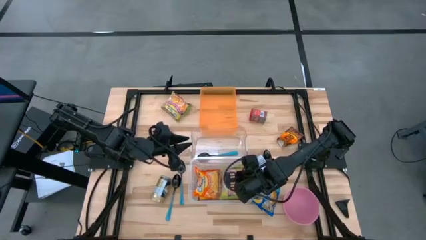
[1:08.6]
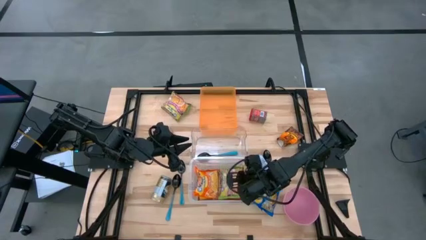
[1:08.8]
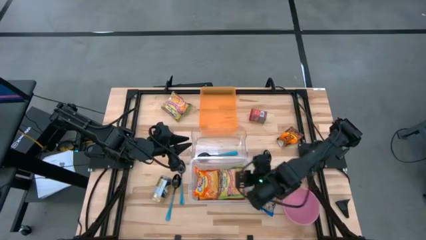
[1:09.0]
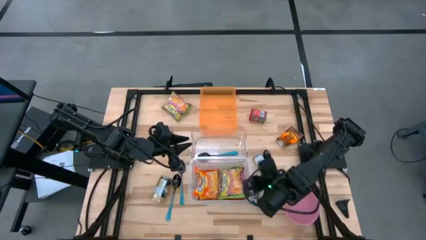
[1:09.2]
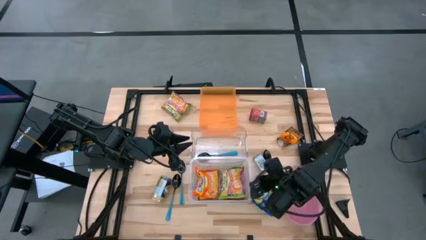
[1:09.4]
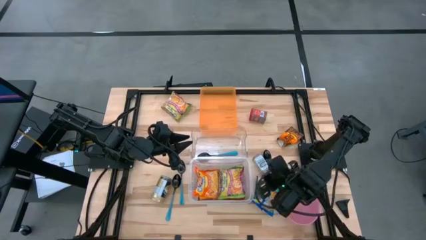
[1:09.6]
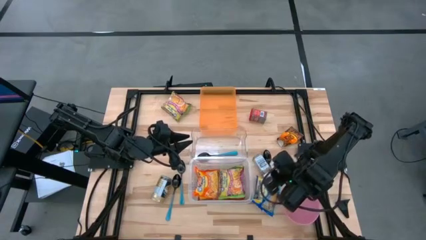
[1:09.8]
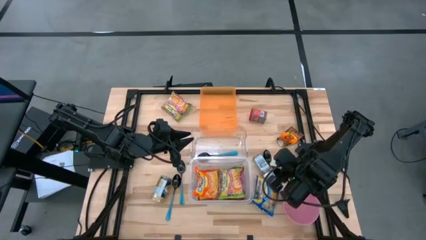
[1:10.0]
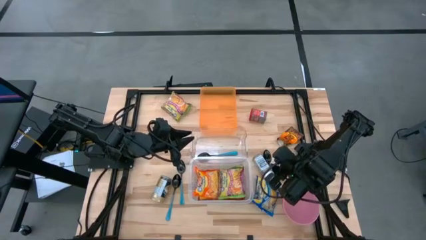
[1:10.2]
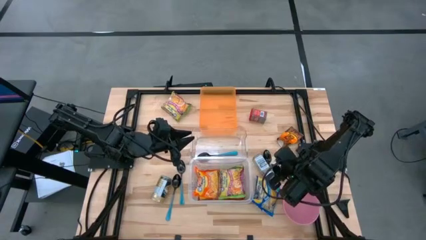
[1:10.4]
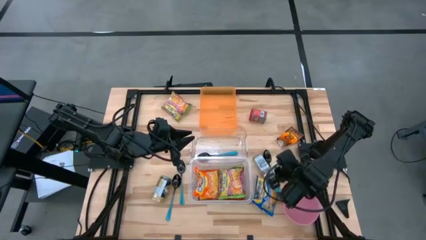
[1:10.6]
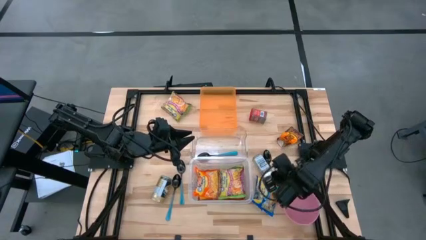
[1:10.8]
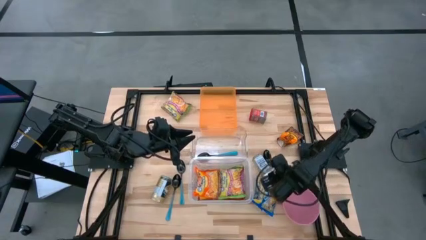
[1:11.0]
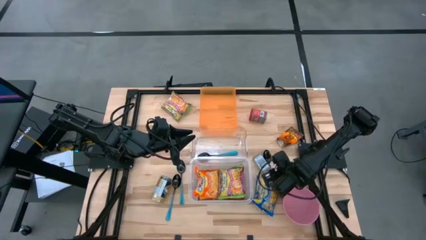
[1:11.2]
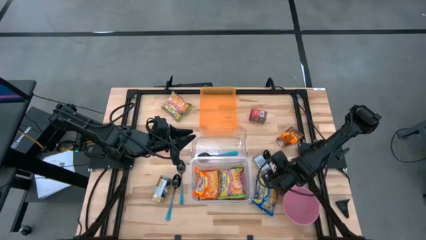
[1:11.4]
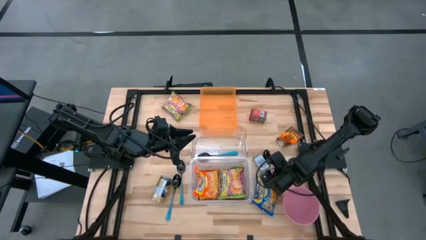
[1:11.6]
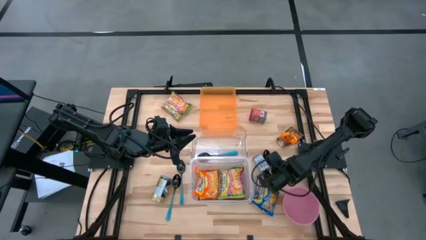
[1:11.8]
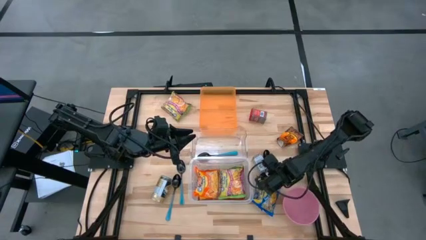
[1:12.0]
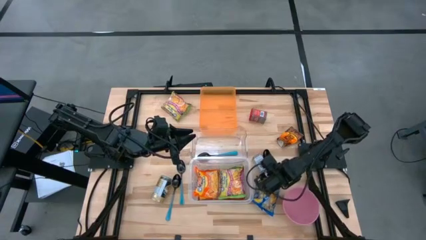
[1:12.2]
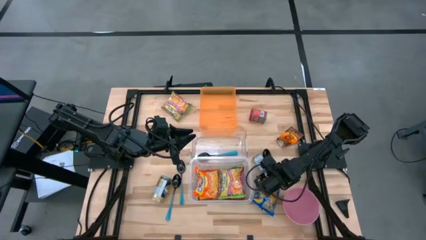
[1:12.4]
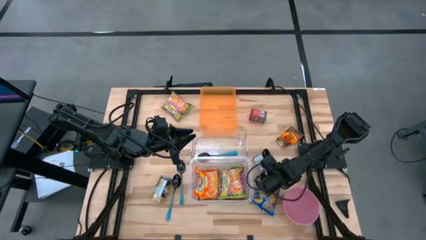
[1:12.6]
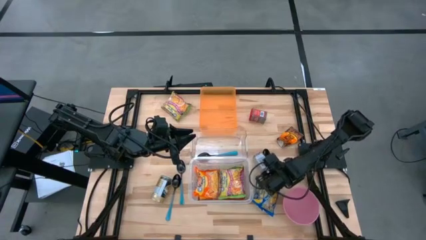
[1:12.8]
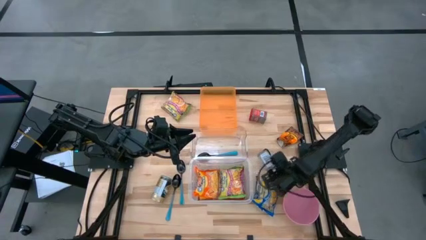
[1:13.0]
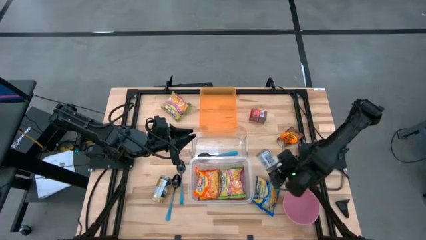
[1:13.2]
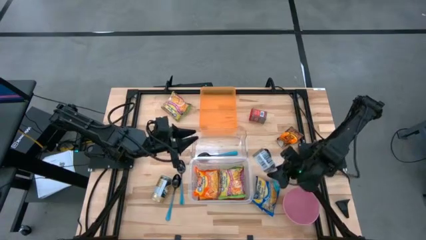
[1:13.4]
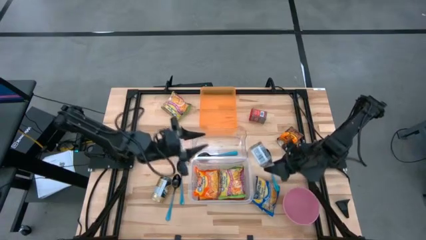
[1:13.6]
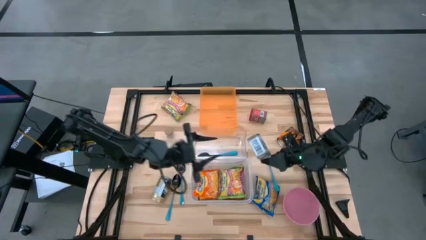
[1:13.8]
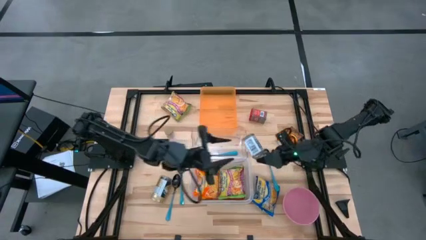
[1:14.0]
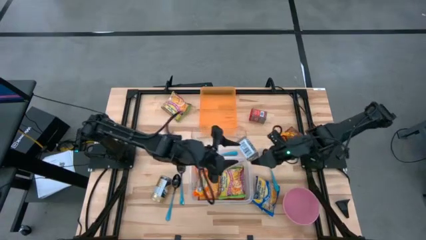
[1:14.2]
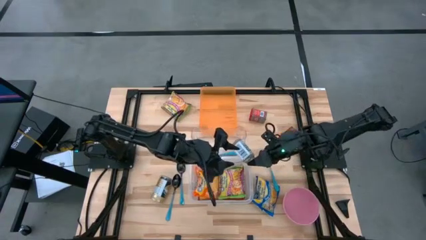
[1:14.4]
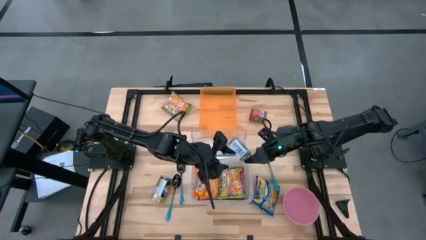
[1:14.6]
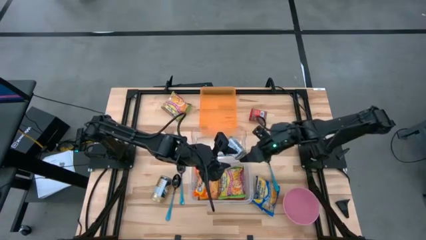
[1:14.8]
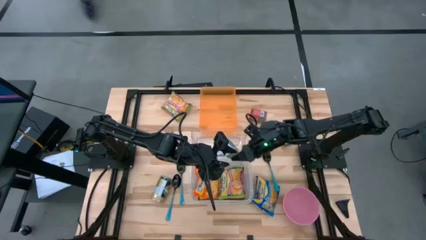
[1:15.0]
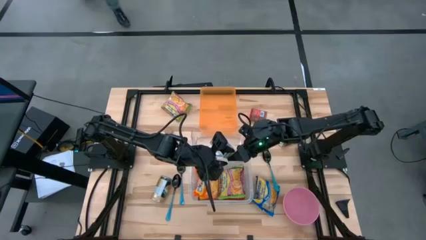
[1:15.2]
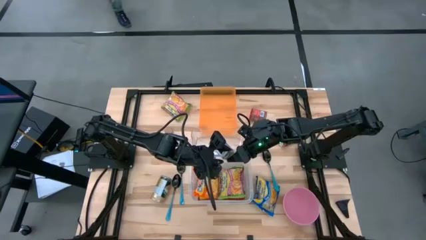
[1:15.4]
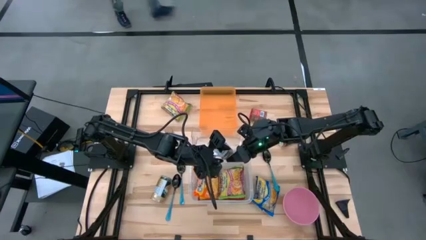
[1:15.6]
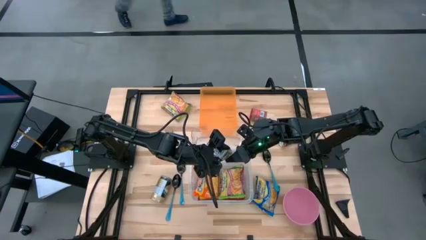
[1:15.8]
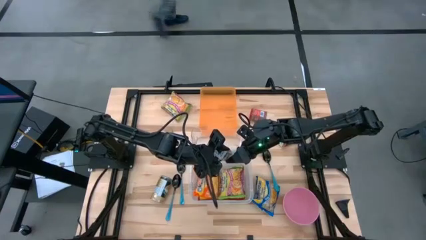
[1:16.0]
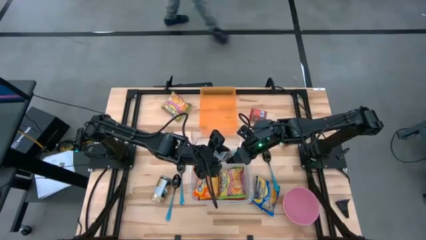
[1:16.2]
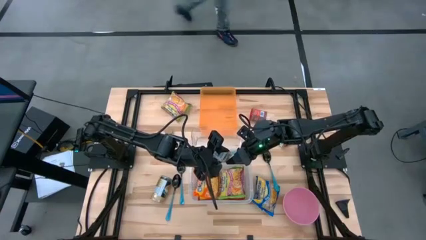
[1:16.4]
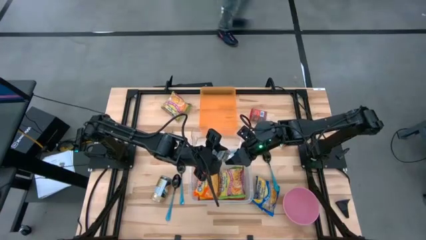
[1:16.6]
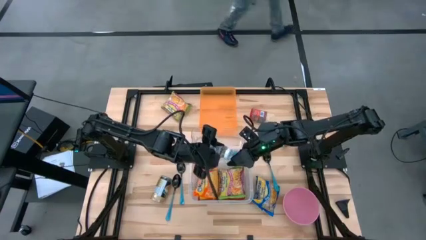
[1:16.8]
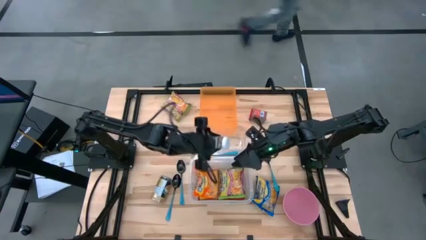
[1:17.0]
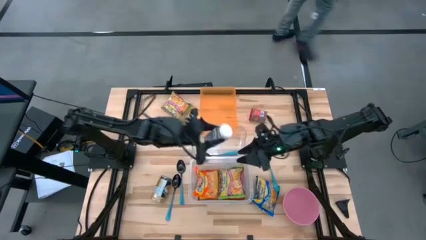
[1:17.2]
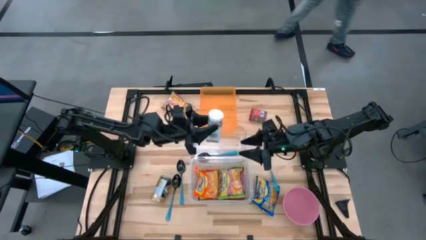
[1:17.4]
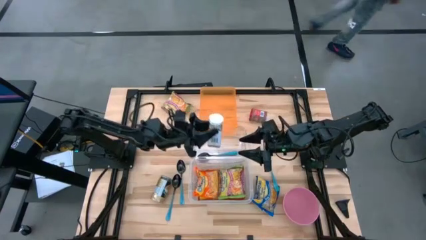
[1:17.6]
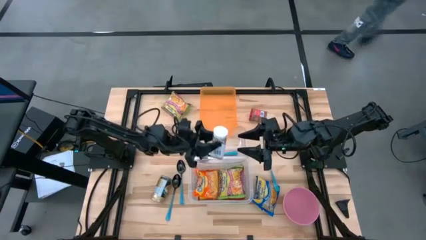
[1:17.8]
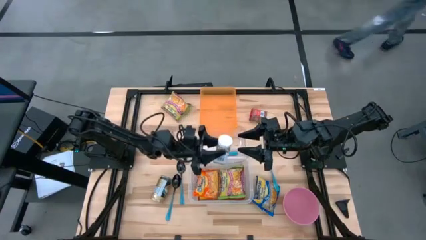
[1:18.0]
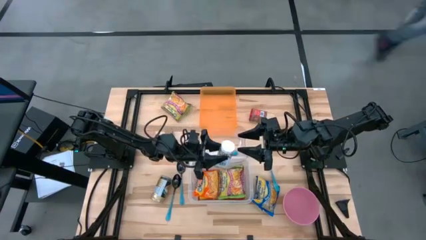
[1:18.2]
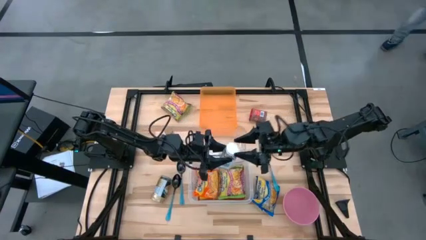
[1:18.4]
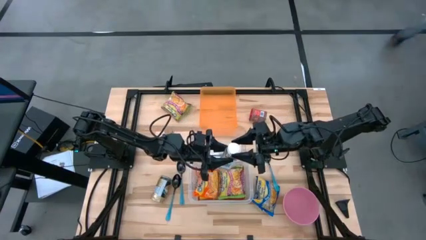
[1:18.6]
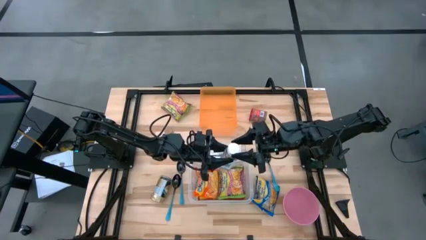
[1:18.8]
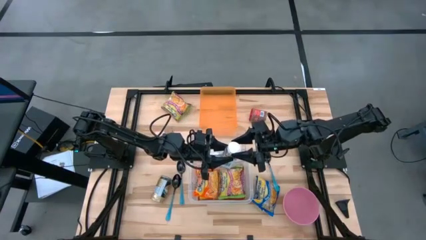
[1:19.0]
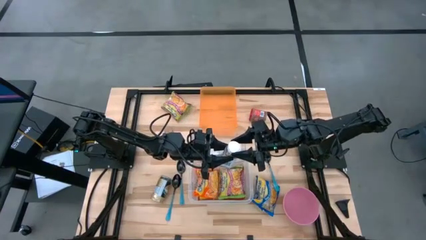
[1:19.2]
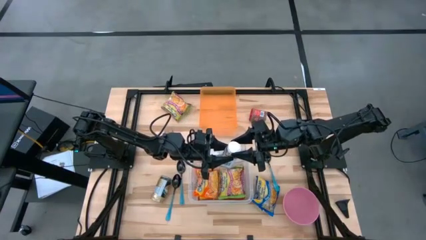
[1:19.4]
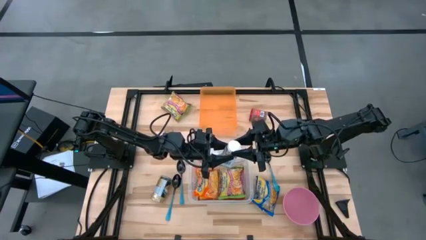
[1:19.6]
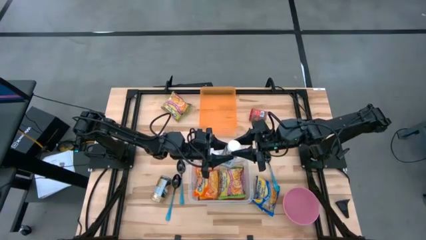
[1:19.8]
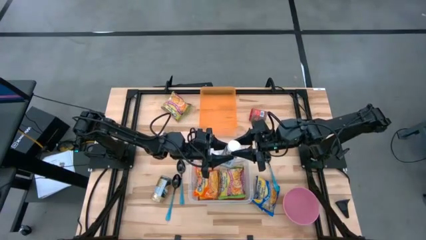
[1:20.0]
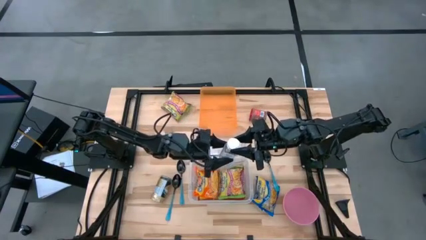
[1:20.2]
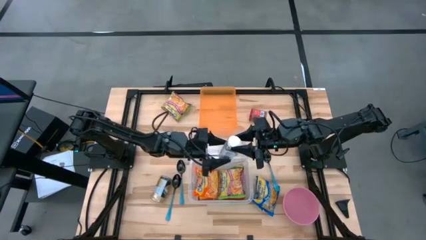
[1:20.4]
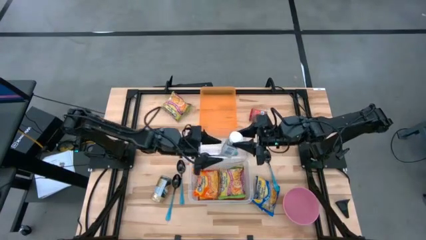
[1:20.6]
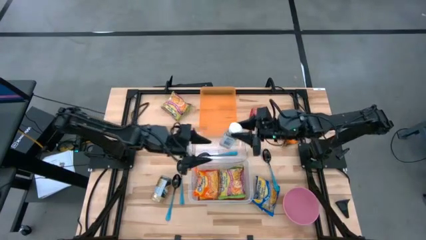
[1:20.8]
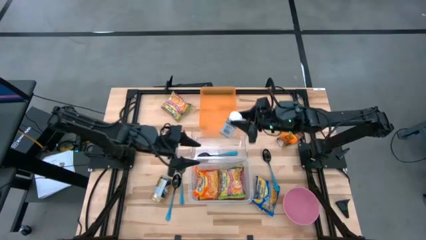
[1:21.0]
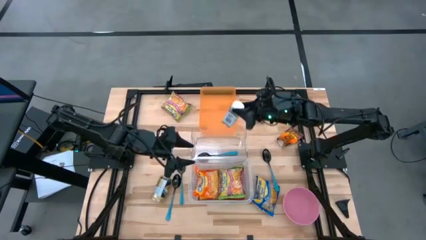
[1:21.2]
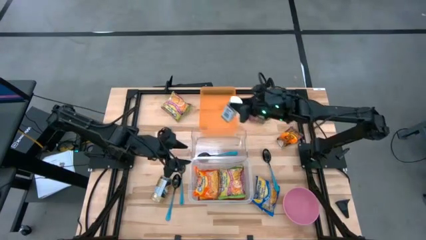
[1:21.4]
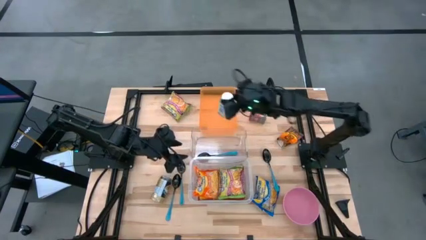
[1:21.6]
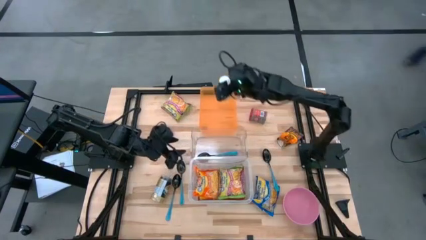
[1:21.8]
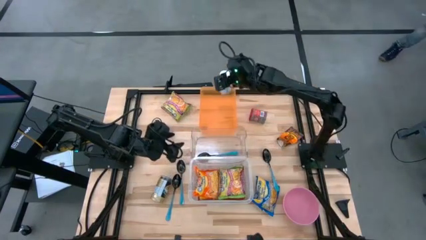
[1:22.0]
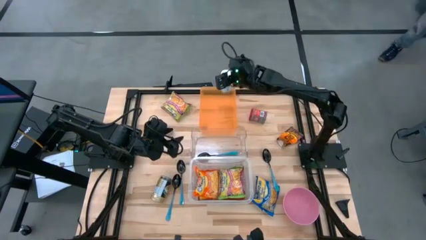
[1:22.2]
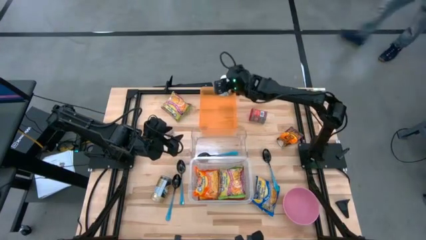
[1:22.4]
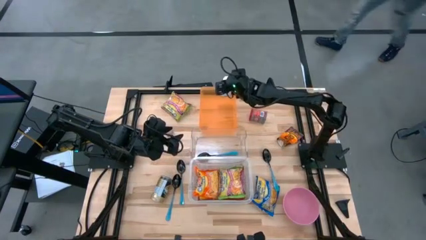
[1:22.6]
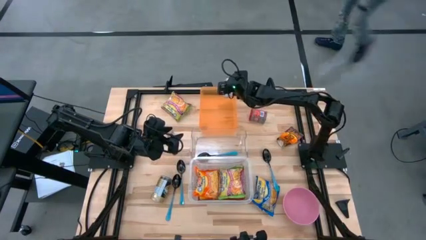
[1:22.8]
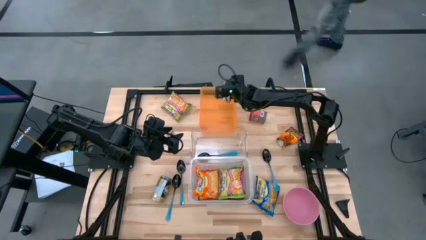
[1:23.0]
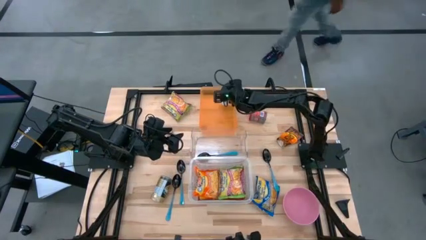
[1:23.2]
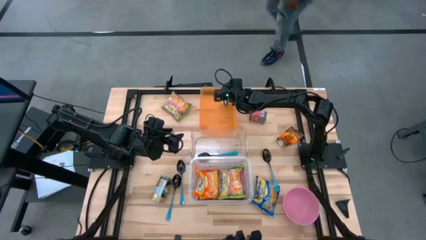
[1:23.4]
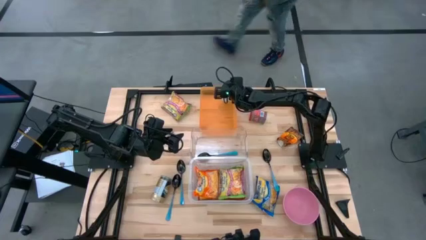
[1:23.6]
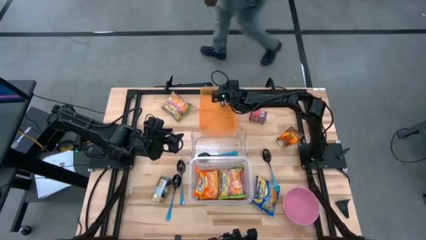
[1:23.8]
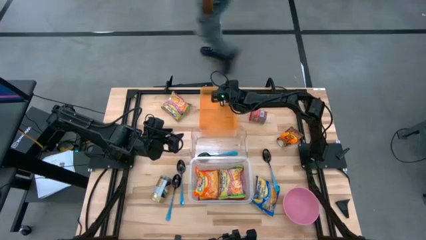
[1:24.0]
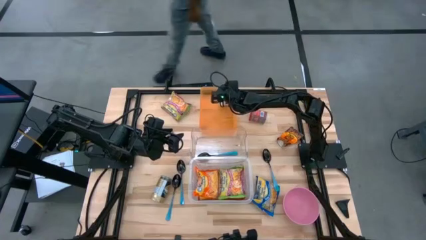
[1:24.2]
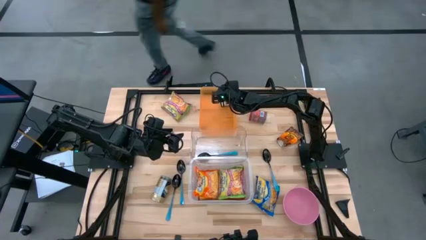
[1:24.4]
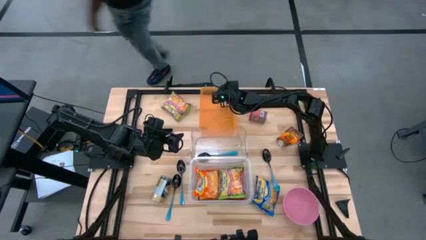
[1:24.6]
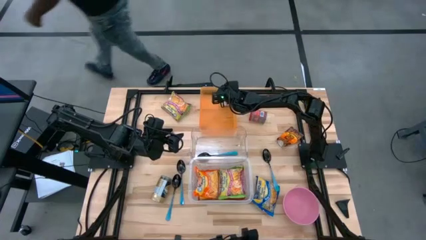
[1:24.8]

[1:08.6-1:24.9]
Task: Pick & Place Food Item
Put the white seasoning bottle into the orange transparent bin
